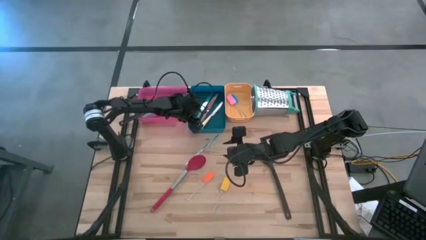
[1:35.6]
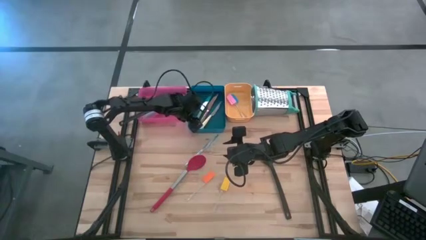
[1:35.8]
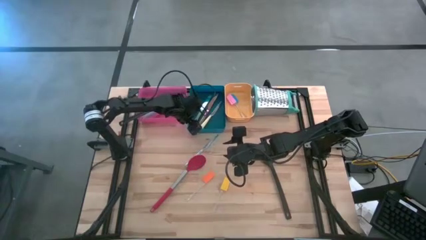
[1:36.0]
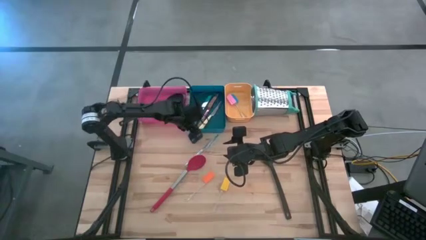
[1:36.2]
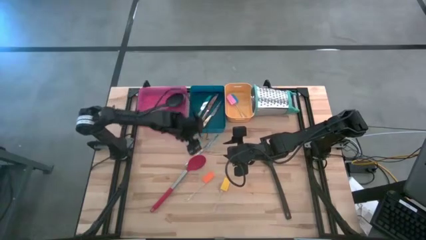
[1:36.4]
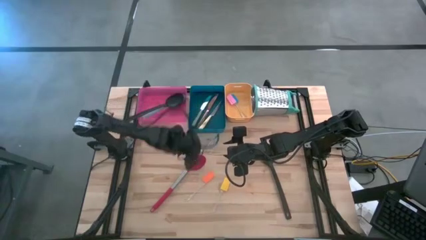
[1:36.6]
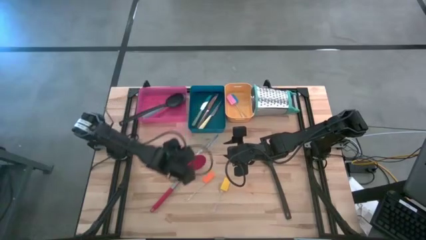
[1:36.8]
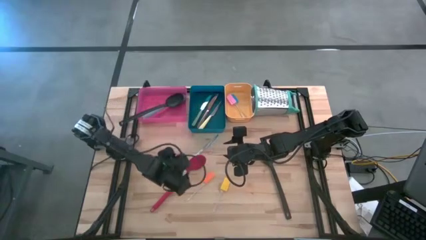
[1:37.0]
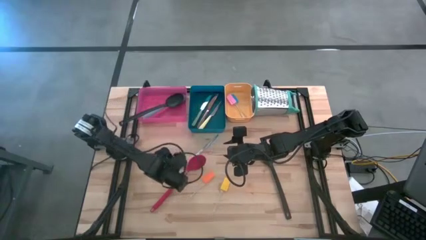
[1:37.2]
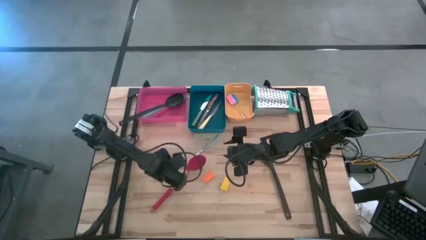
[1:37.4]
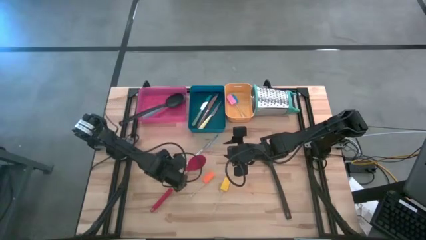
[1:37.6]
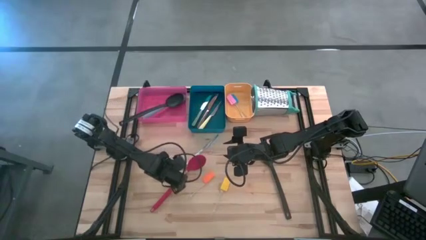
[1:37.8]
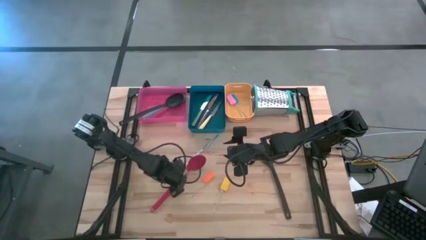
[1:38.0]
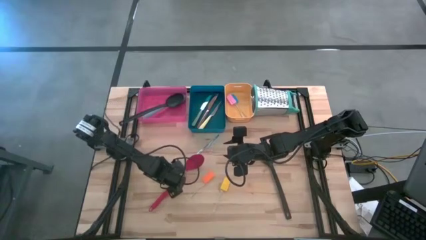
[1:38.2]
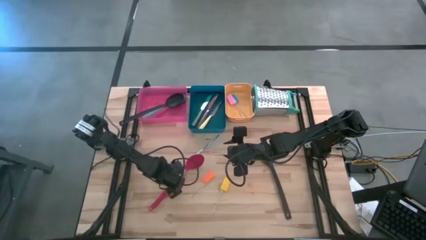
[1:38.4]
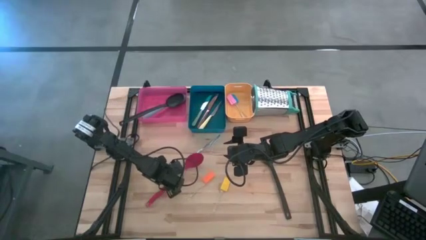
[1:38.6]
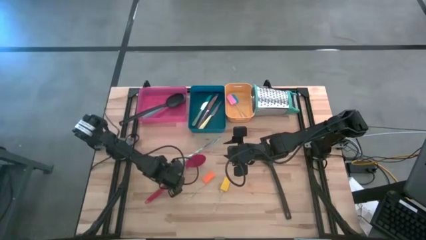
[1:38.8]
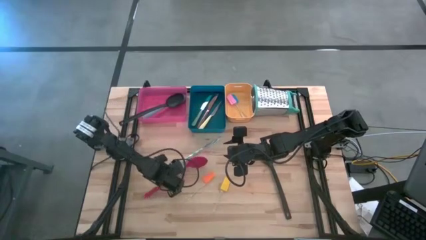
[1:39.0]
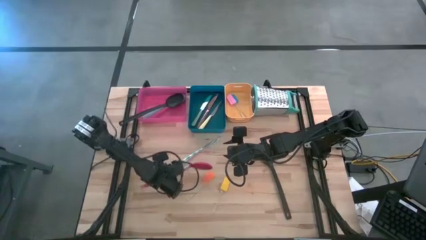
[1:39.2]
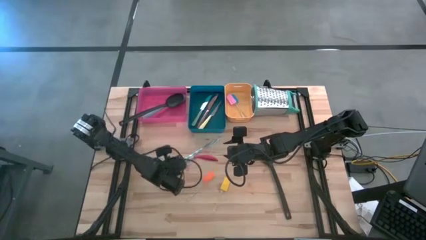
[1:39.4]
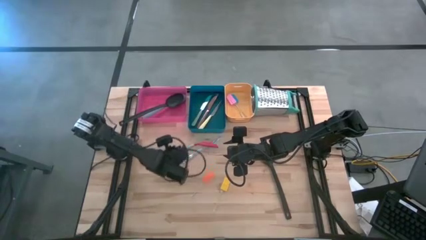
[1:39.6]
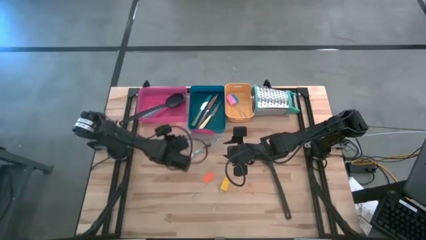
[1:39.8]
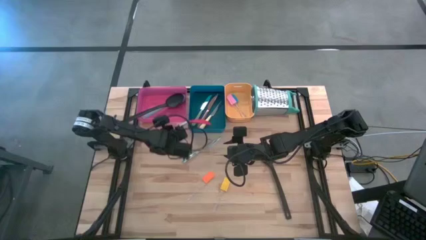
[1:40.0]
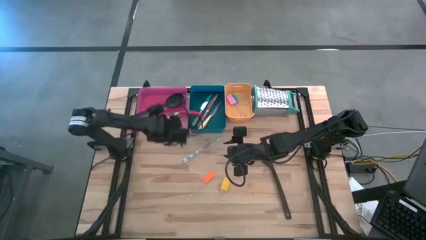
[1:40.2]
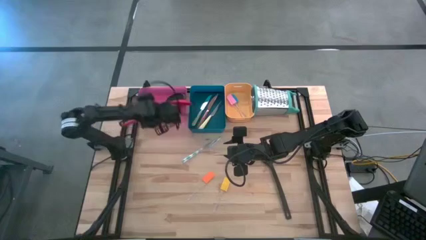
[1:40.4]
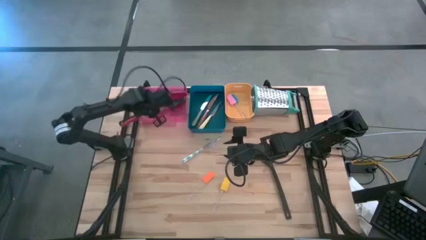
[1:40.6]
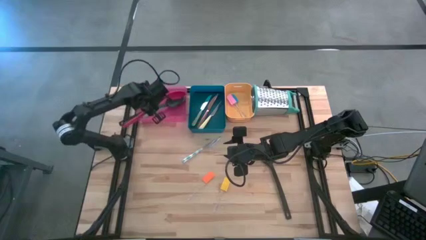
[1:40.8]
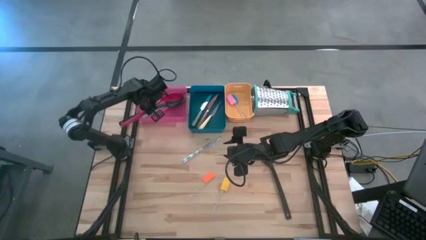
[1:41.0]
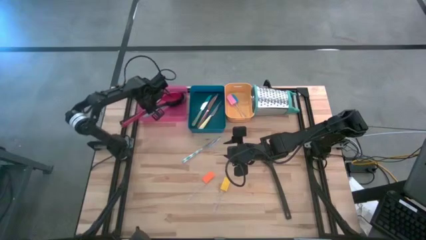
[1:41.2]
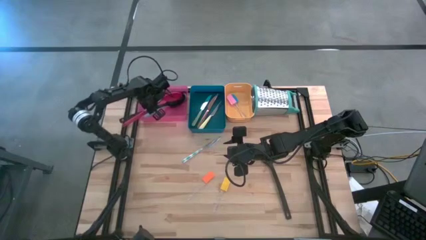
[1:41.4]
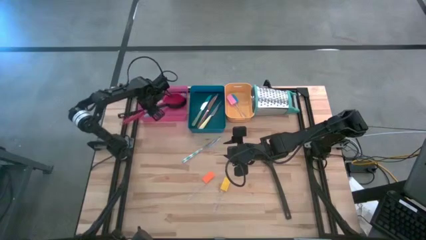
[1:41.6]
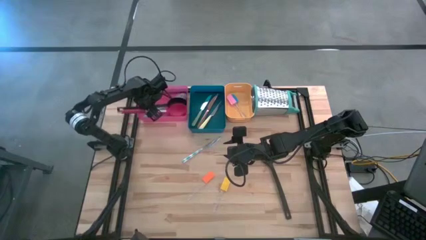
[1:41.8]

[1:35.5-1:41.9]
Task: Pick & Place Kitchen Items
Put the red serving spoon into the pink bin

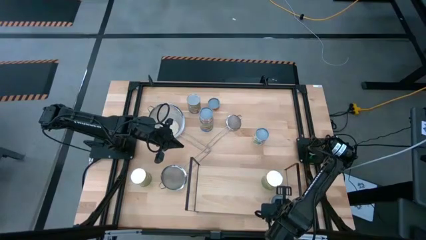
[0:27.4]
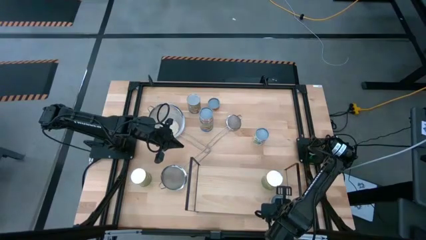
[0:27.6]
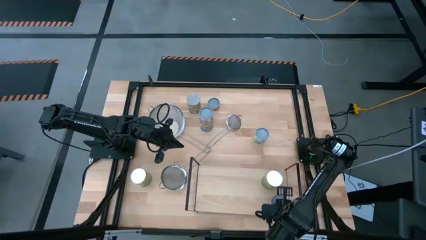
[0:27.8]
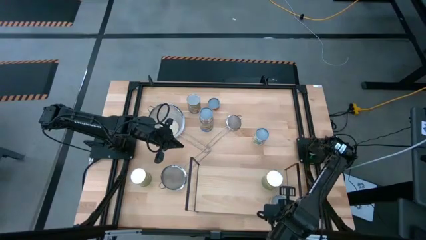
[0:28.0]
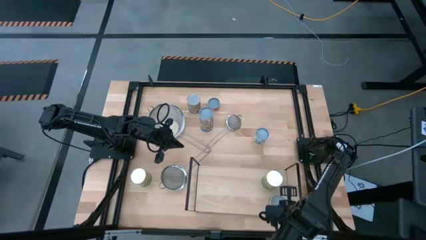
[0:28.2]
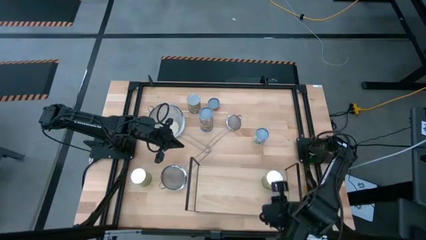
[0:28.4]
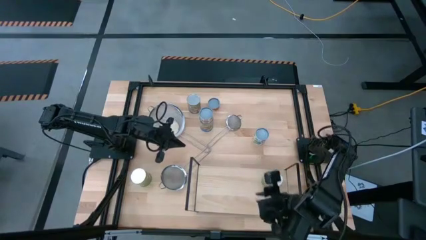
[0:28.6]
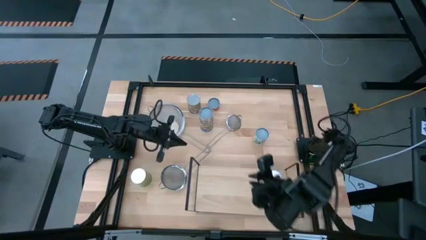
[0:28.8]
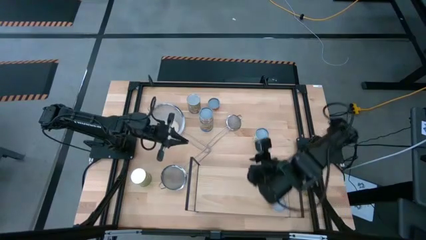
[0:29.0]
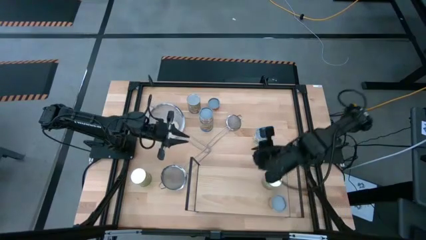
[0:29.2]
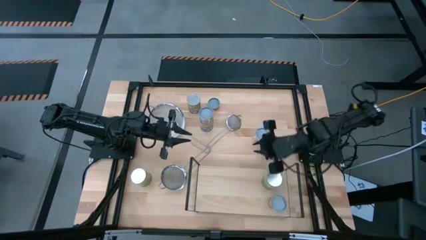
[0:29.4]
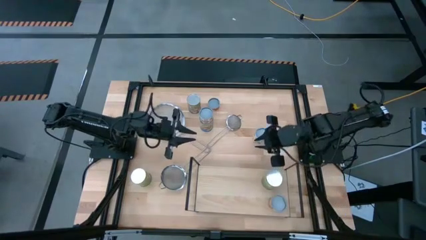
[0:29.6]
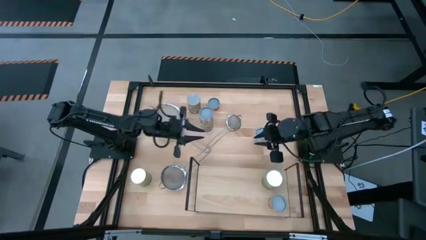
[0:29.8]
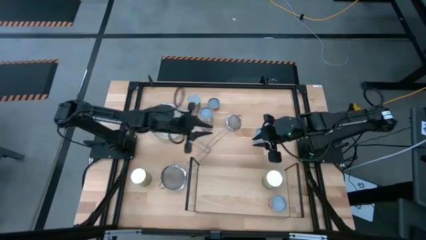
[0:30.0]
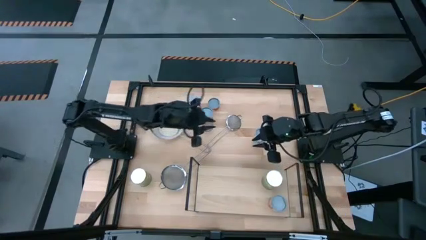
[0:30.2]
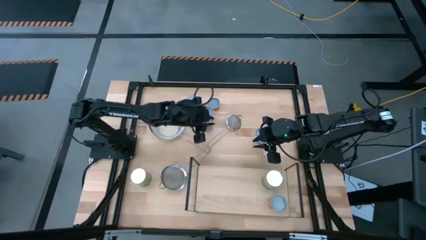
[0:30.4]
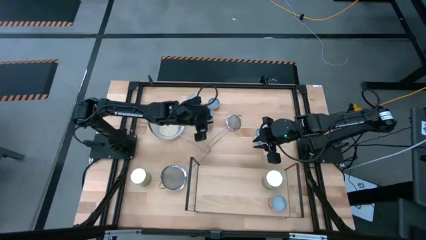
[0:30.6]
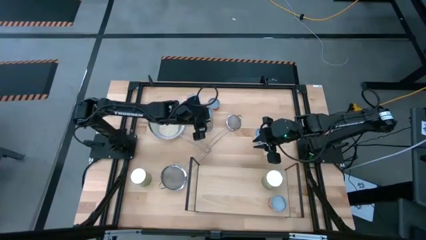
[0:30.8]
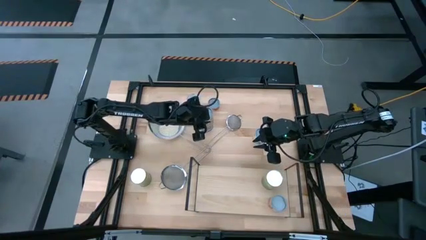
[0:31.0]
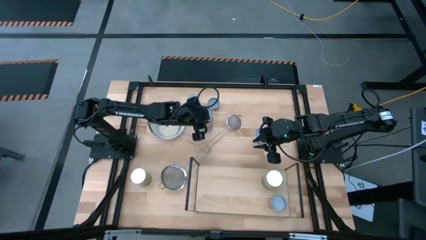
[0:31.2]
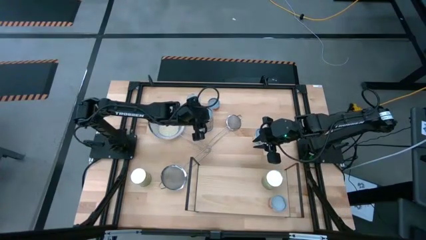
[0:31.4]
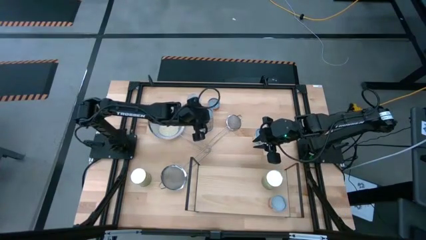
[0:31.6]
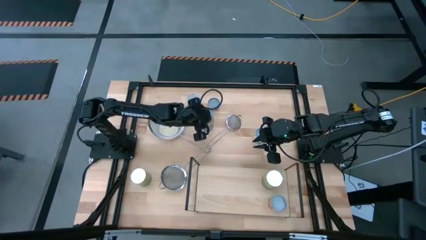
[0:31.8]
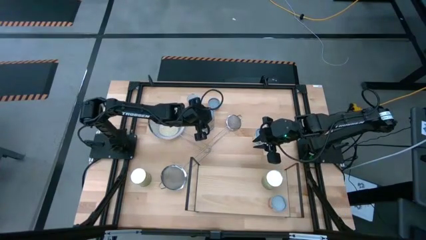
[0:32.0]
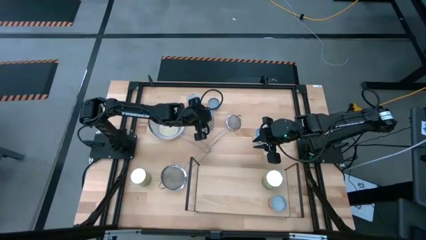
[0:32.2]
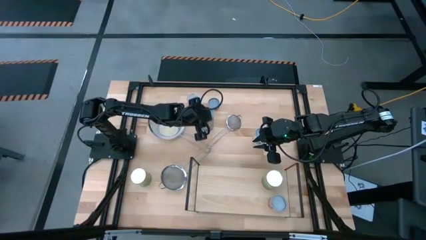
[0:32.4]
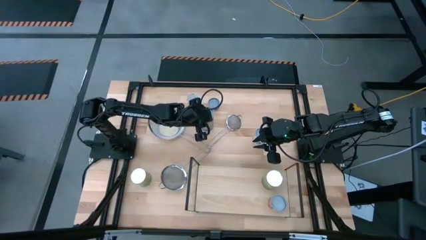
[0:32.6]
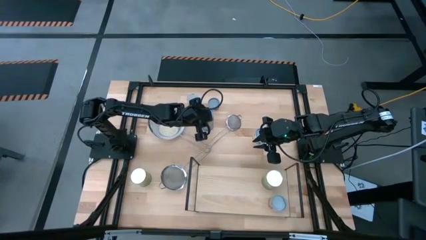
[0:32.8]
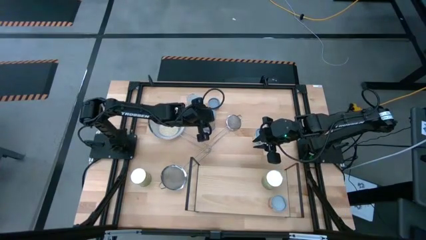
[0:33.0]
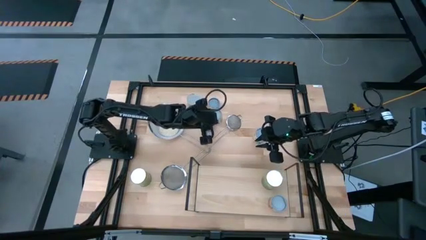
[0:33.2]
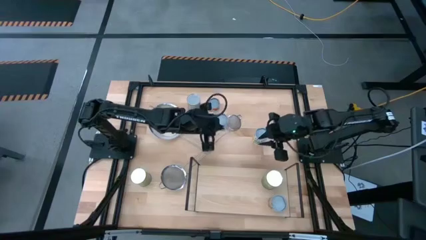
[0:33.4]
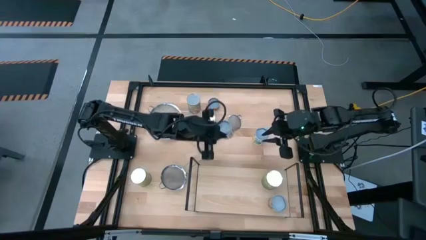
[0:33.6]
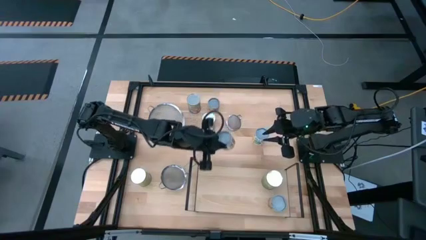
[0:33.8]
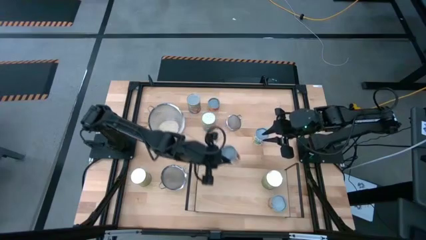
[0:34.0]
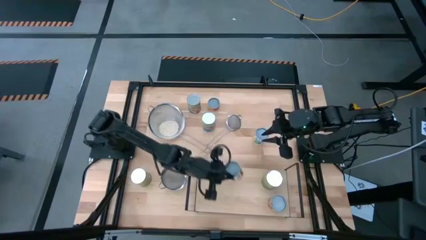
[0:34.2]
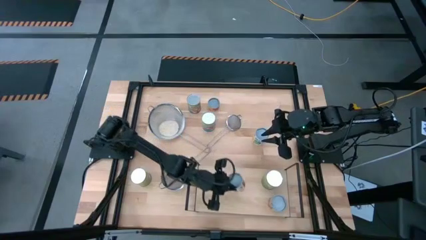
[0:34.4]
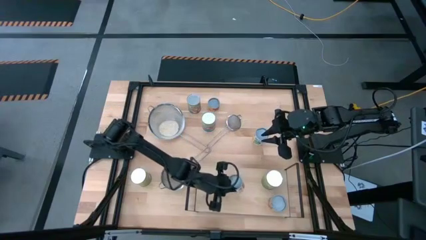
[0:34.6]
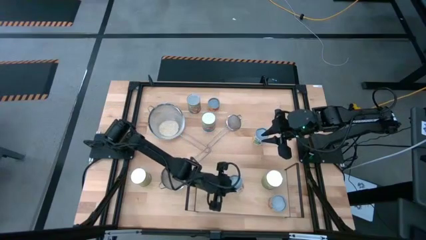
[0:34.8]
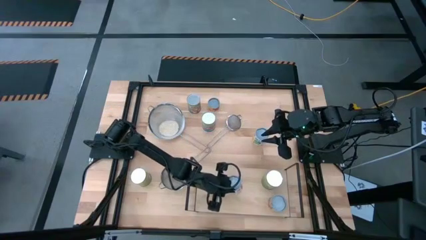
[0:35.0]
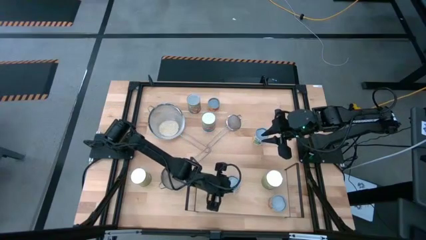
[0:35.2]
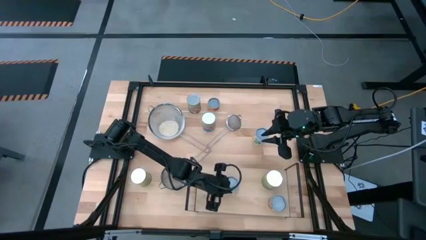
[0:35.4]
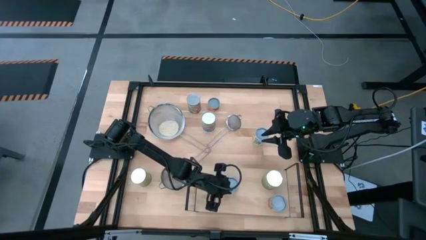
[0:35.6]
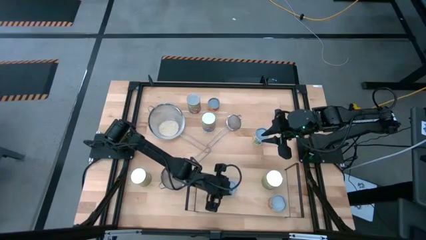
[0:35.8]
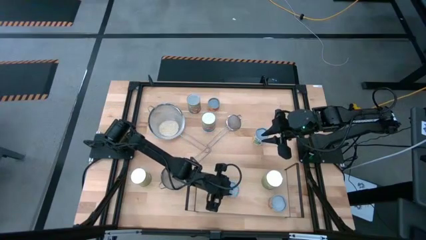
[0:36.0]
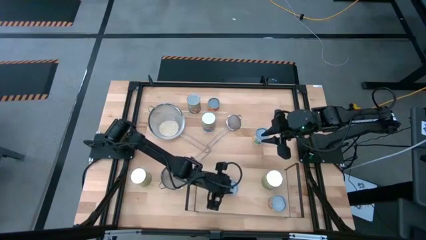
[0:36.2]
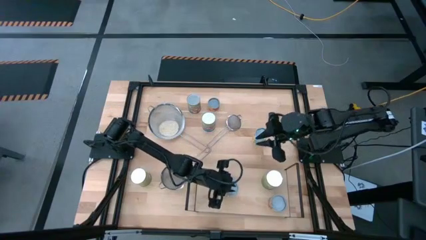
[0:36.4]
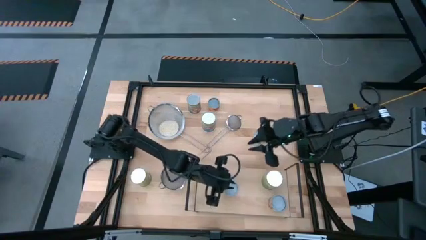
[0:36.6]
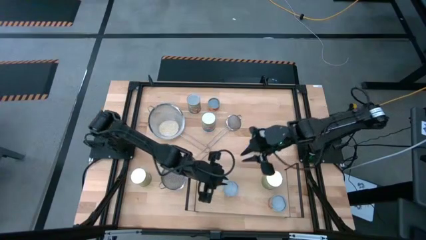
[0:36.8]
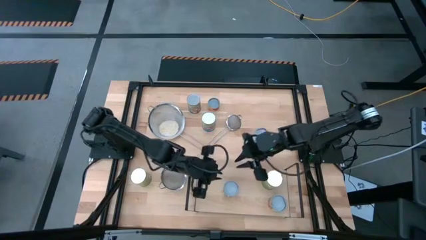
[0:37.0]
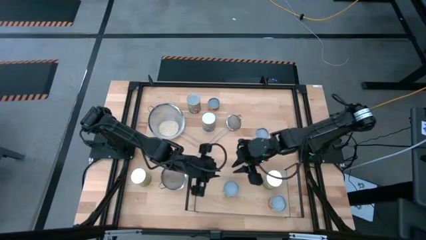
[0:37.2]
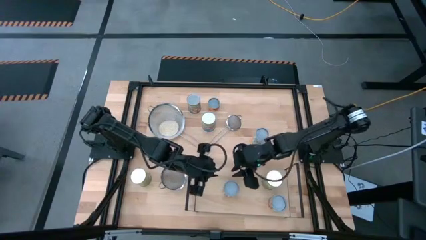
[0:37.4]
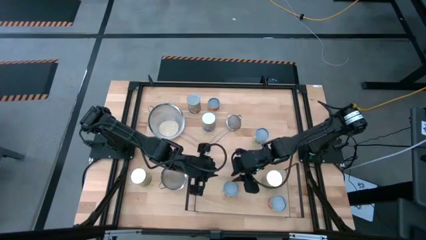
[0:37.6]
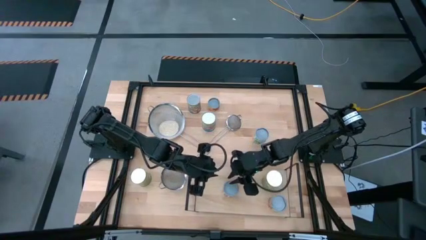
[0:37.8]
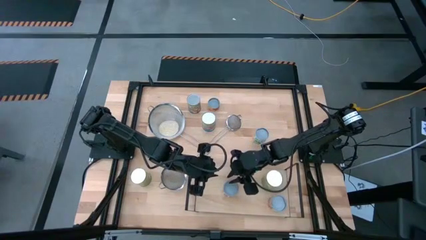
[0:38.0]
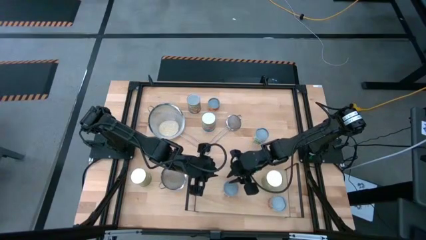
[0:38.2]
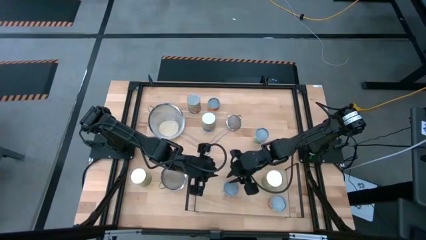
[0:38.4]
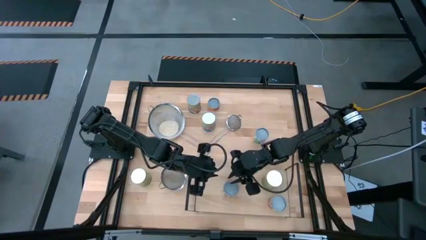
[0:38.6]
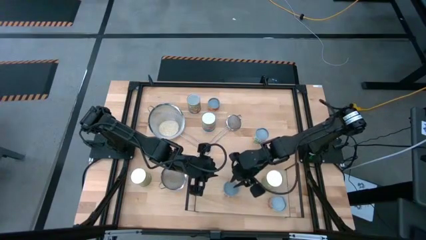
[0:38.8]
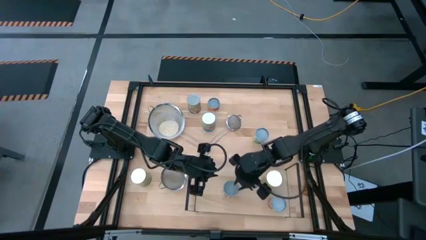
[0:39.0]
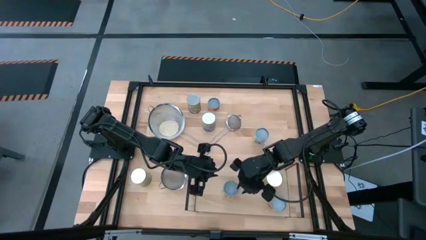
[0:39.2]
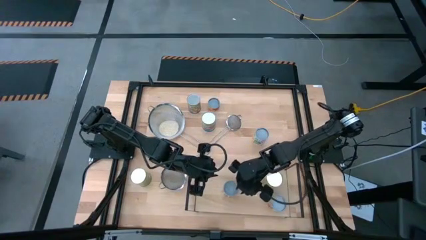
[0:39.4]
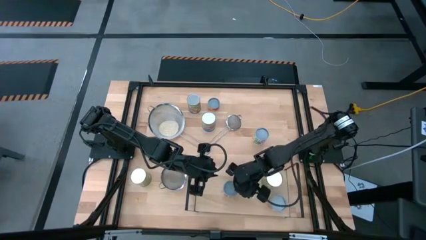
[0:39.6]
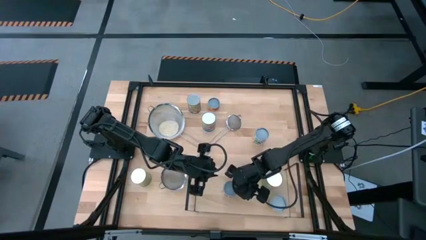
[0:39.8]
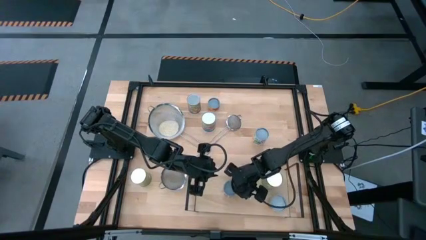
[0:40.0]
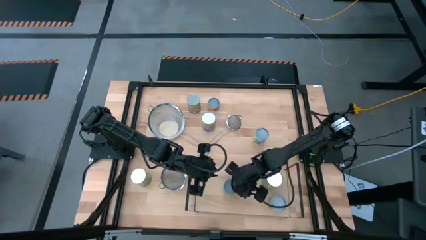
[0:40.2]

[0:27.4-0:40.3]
Task: Pick and place cans onto a shelf
Put the small canned tomatoes on the shelf
